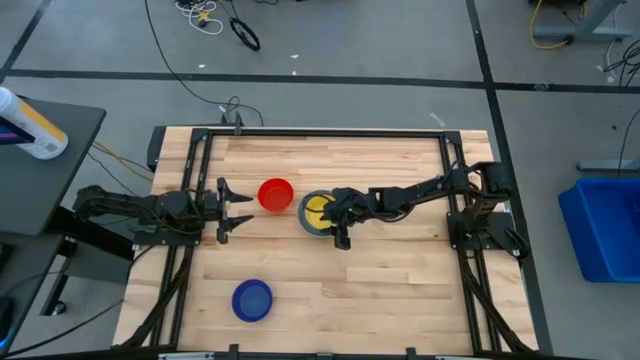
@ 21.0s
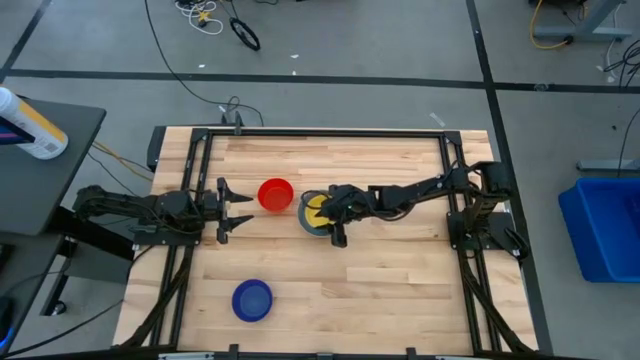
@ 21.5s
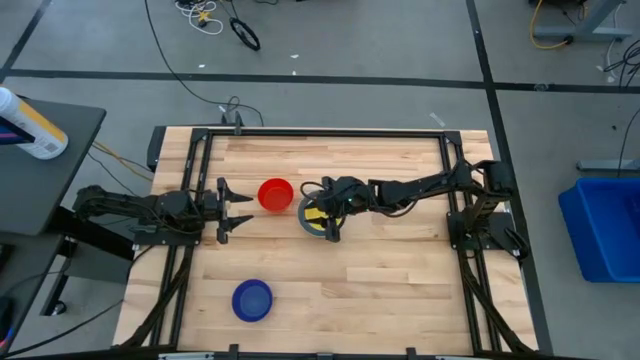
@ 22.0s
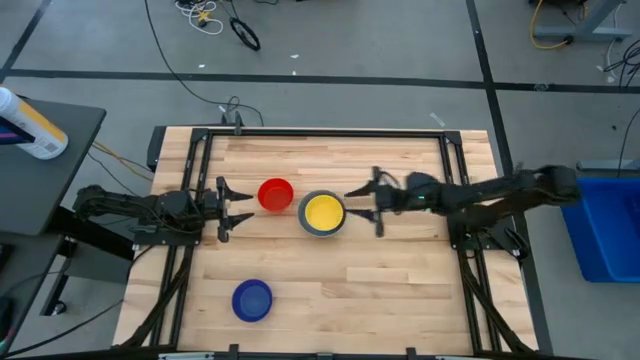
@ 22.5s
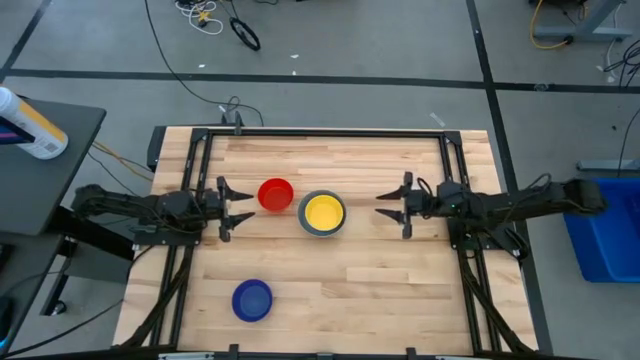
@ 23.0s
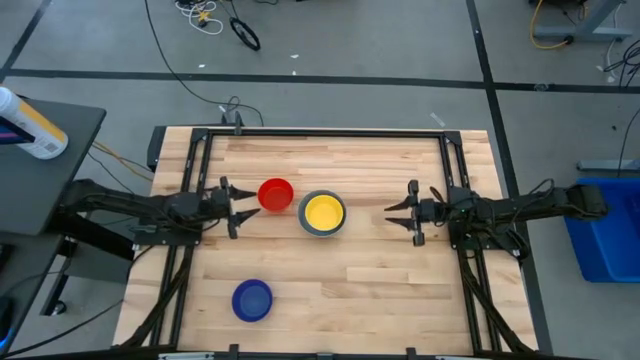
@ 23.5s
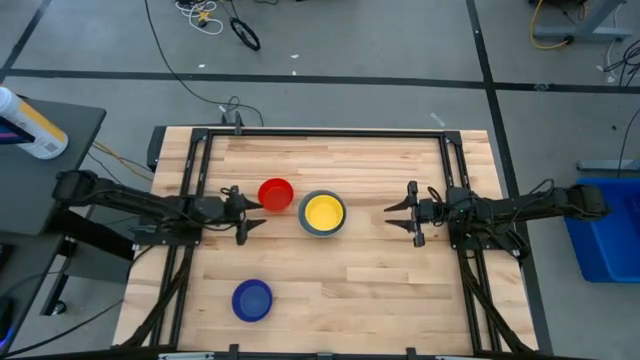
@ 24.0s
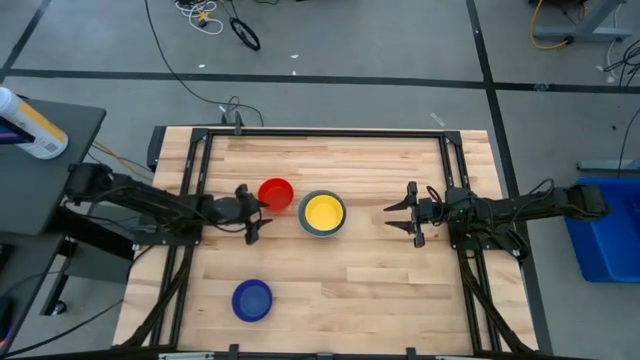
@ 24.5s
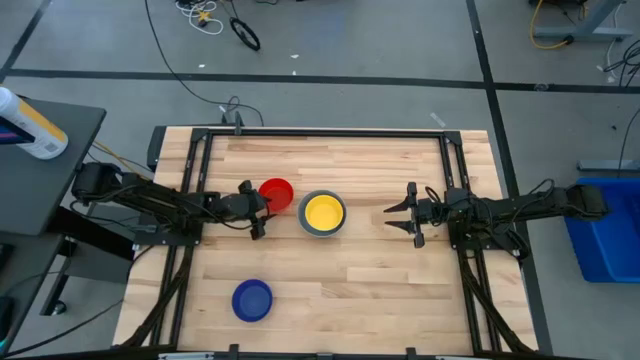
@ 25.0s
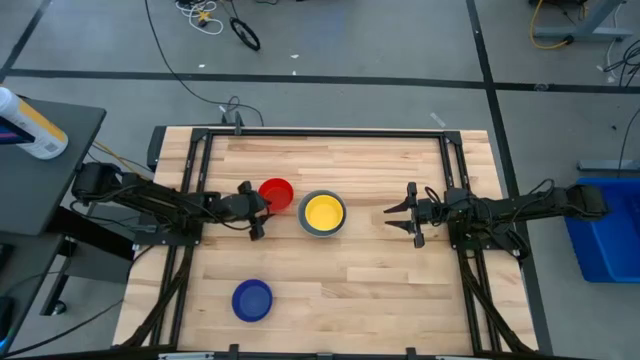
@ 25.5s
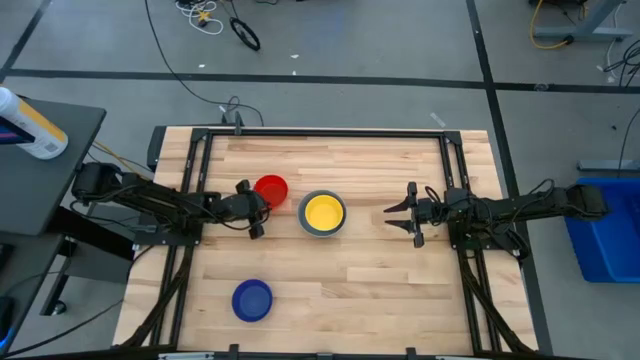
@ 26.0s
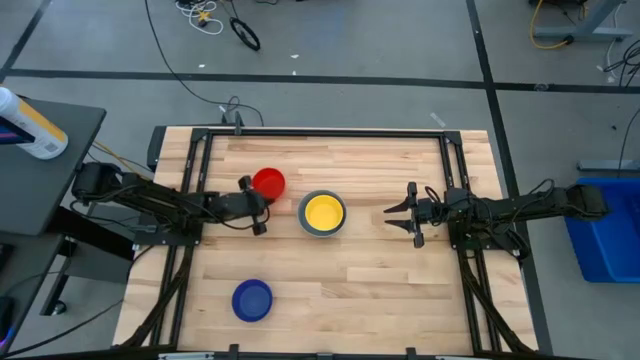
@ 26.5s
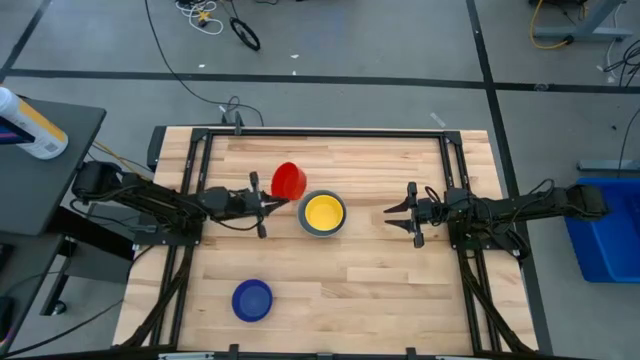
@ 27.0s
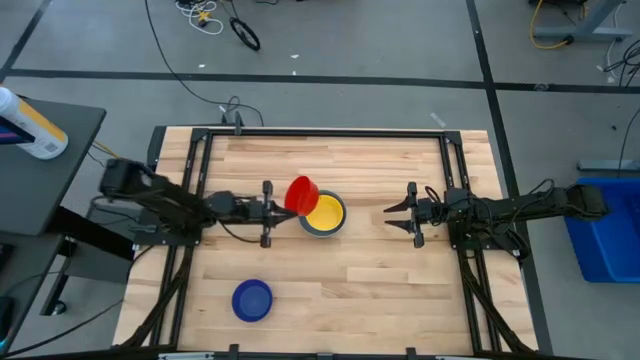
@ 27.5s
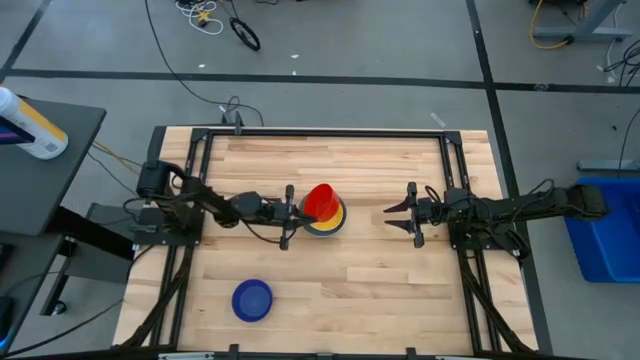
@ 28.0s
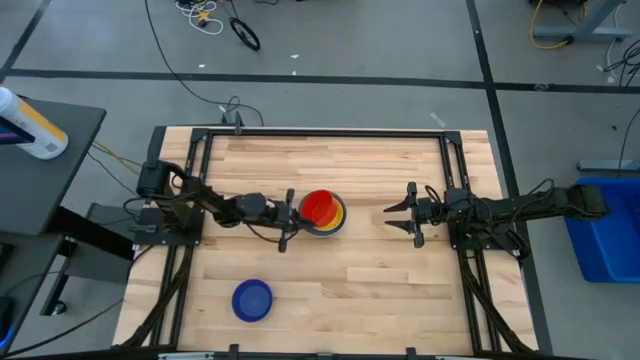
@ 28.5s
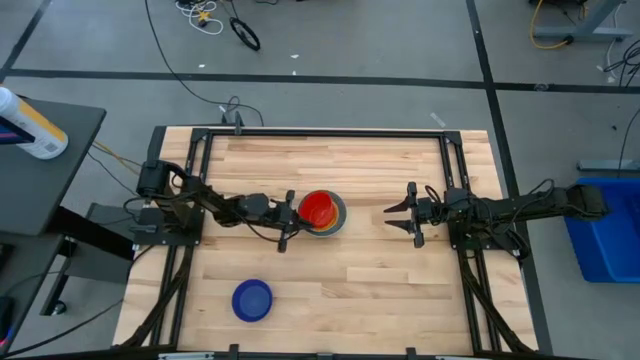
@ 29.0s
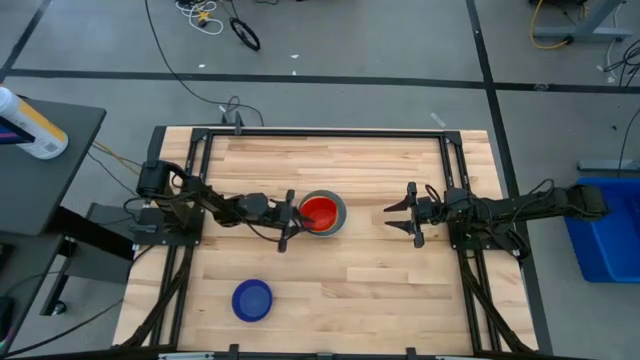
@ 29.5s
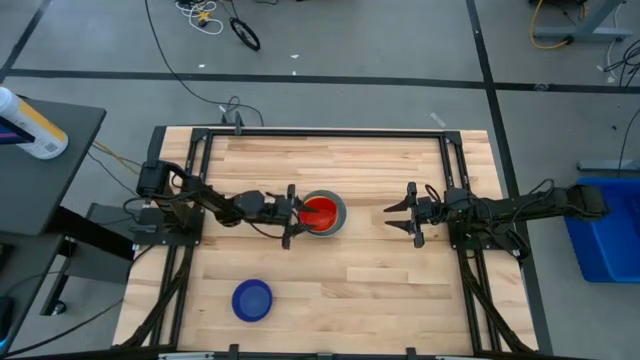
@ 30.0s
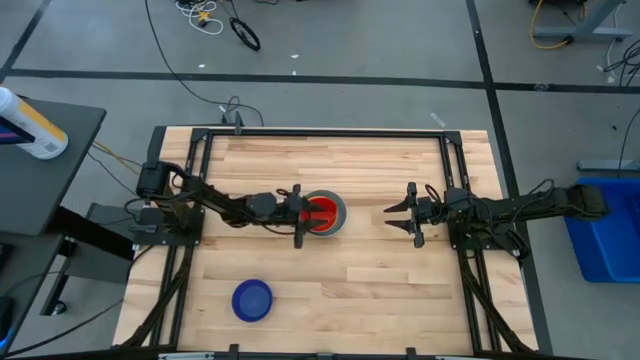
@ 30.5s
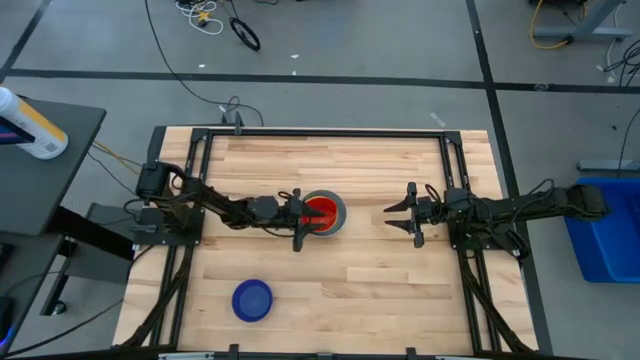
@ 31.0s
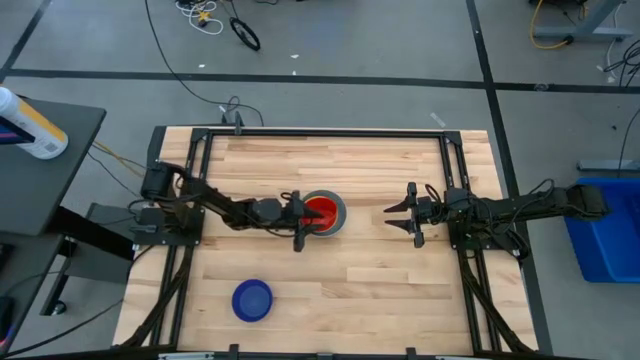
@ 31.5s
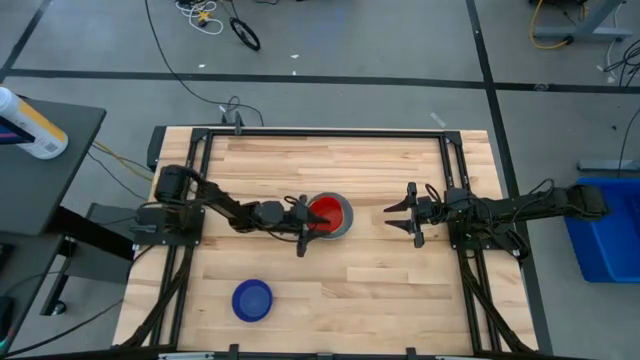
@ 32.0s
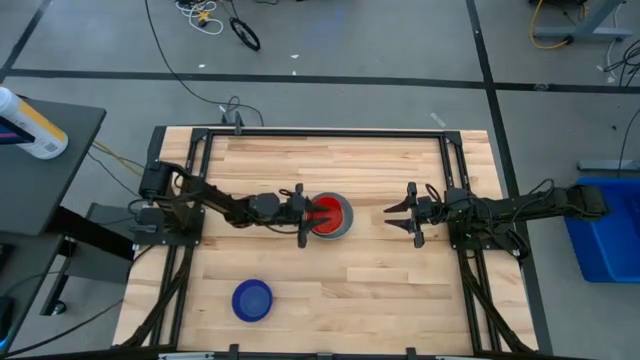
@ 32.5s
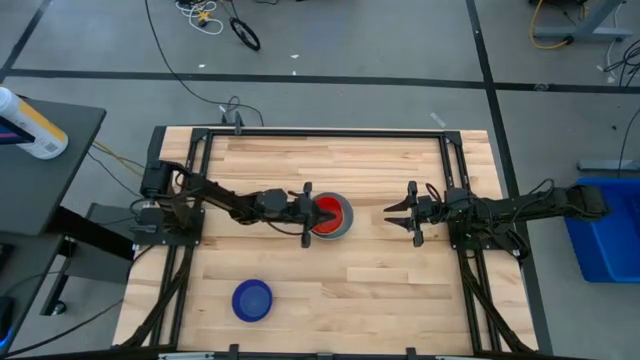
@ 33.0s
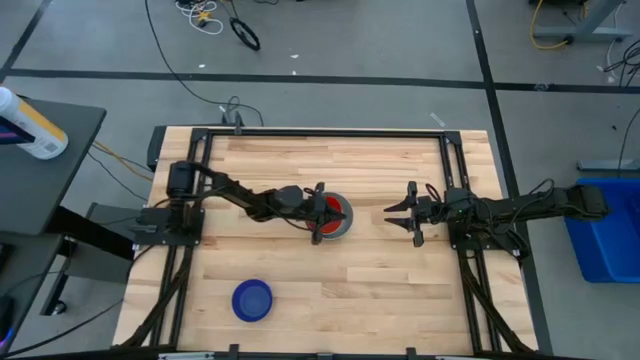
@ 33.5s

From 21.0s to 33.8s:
Stack the red bowl on the yellow bowl

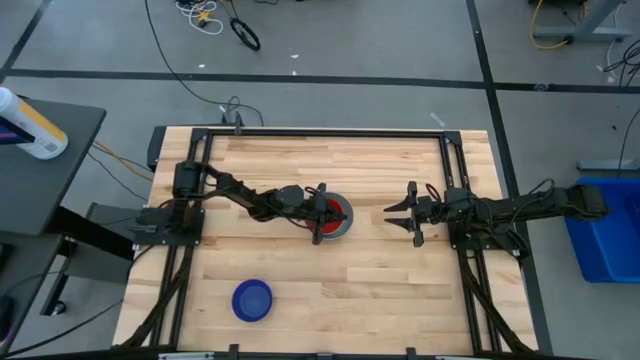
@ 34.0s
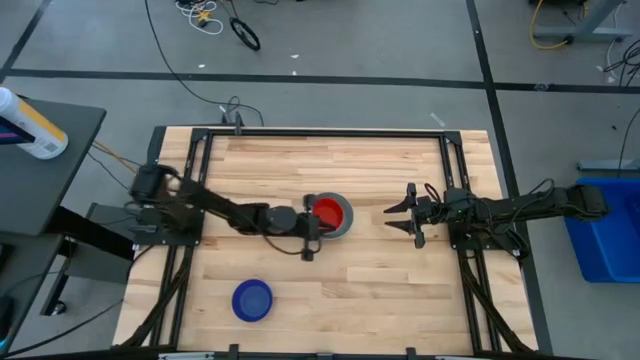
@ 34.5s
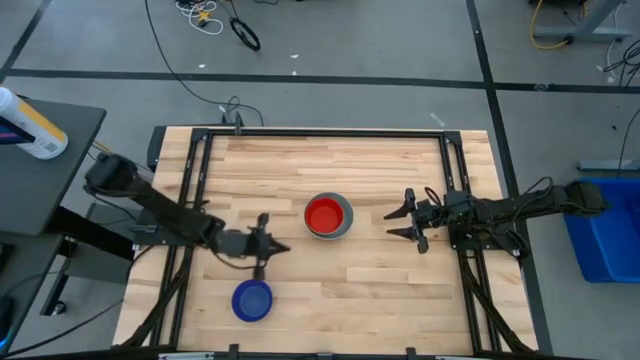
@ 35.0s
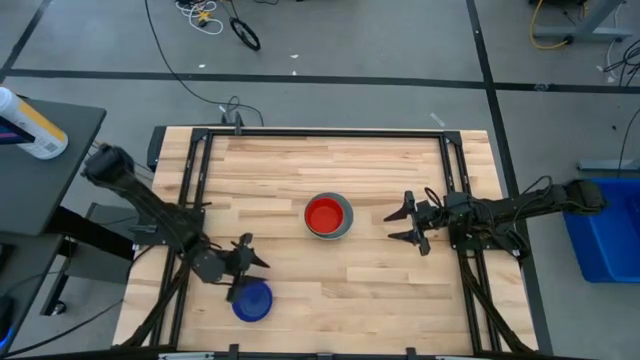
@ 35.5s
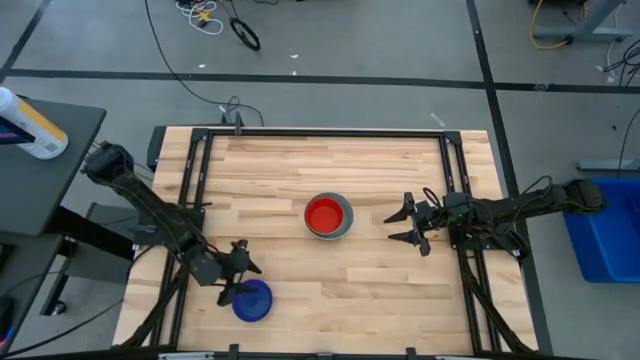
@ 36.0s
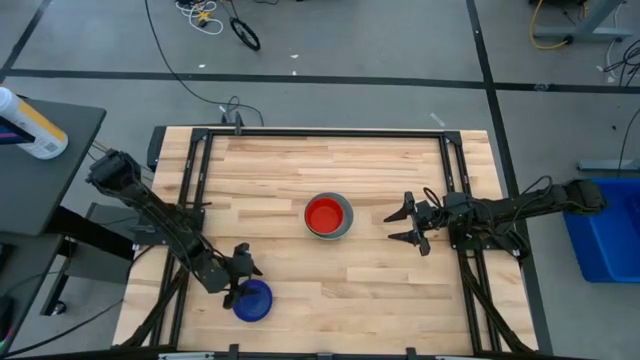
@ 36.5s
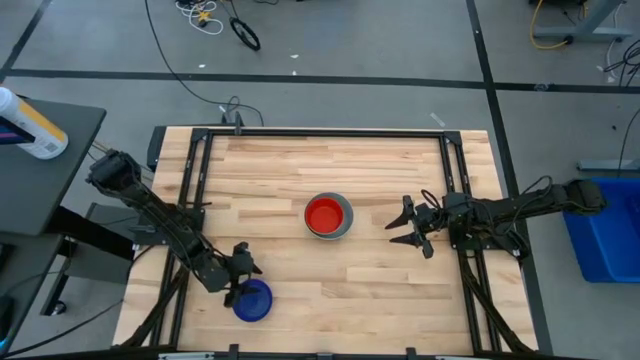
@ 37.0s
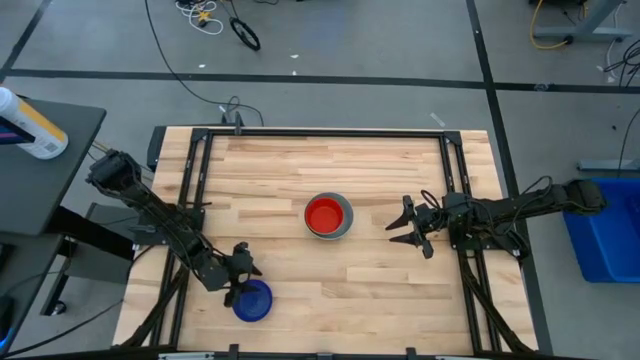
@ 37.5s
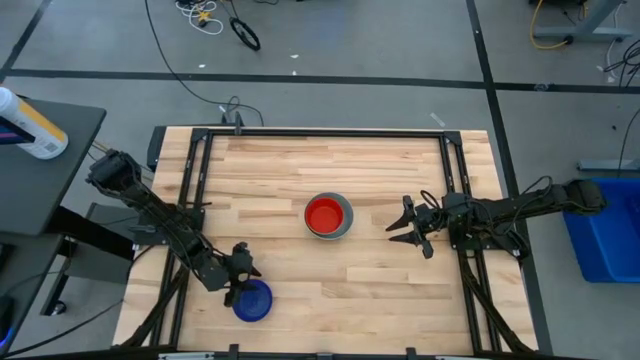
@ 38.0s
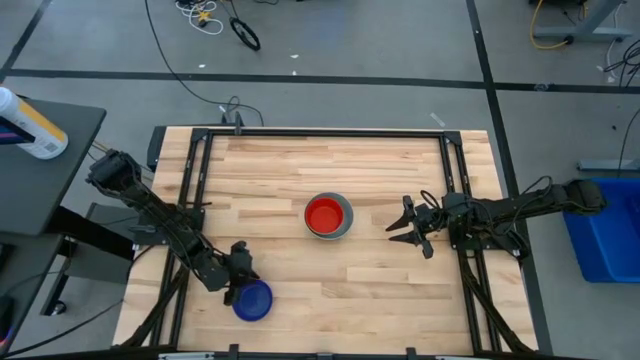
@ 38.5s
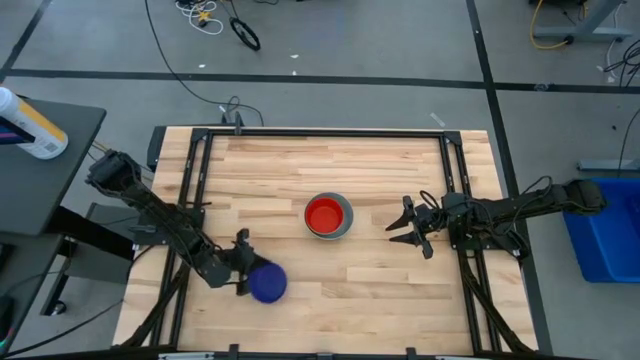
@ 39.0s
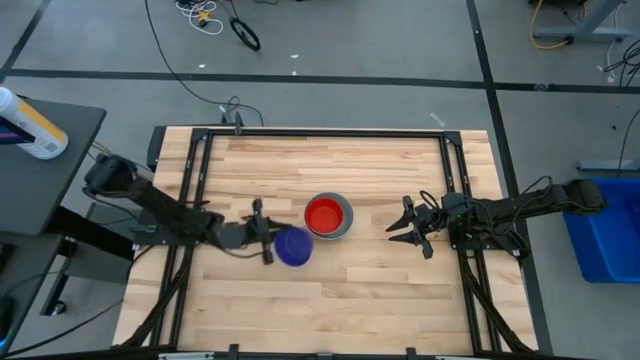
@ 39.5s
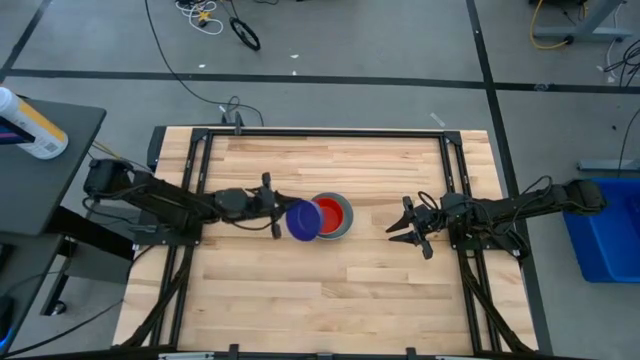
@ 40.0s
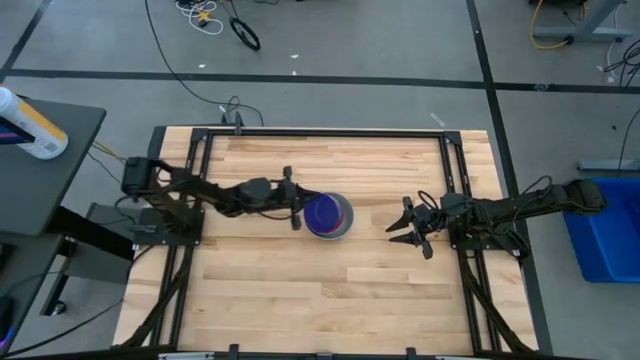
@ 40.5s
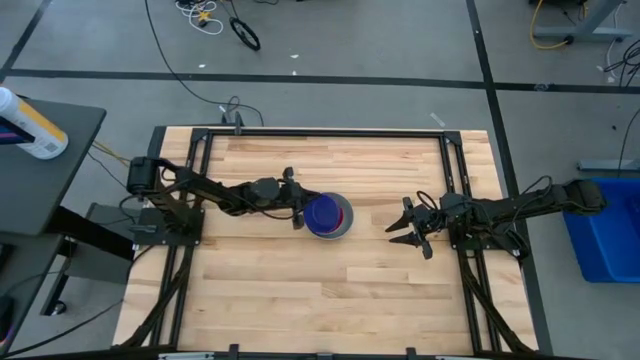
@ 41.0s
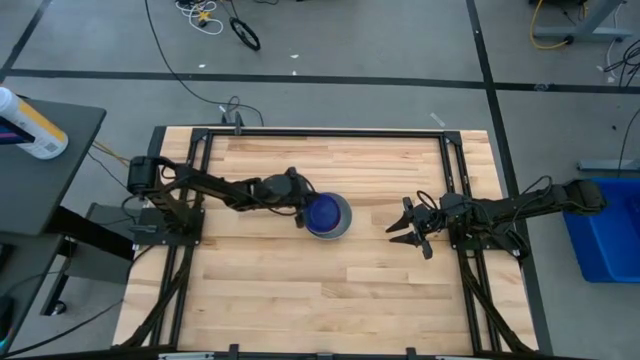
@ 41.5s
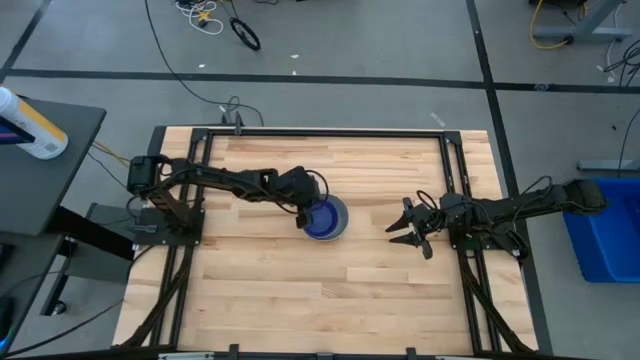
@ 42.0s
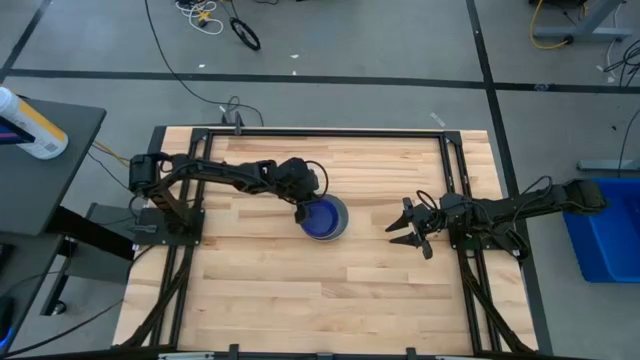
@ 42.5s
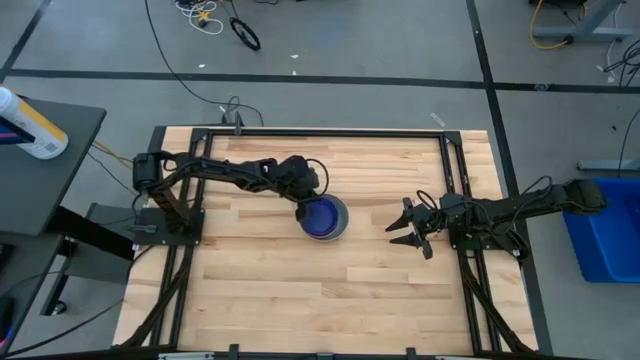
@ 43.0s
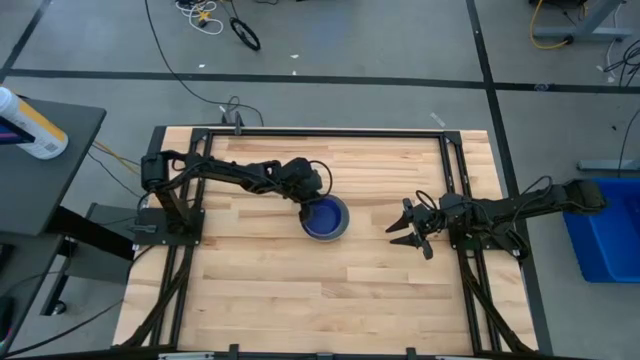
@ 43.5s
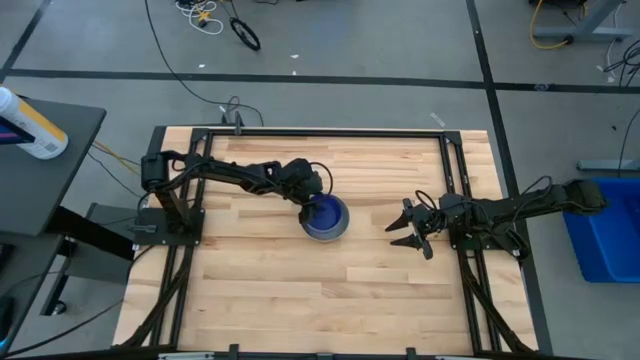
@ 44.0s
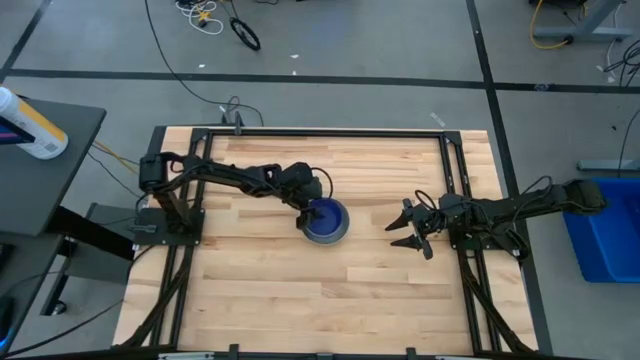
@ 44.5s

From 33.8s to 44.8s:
Stack the blue bowl on the red bowl
